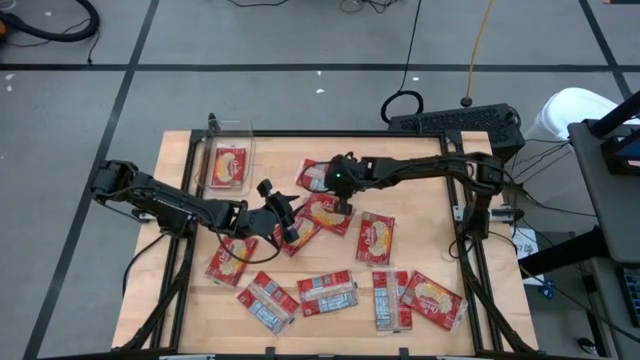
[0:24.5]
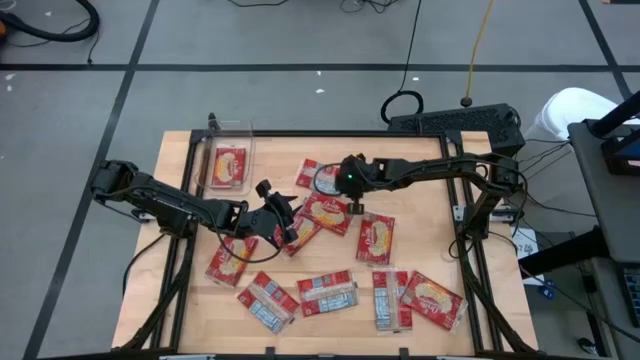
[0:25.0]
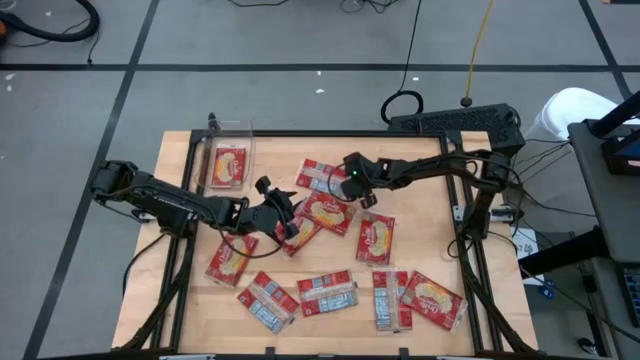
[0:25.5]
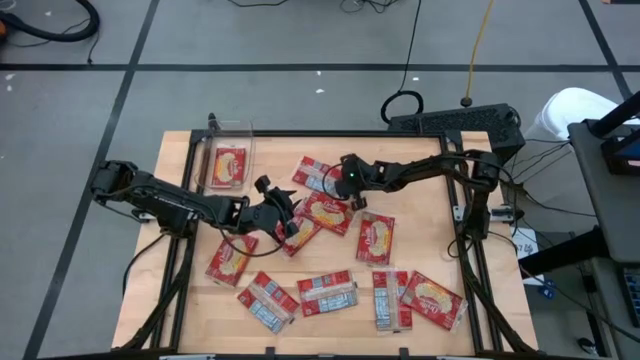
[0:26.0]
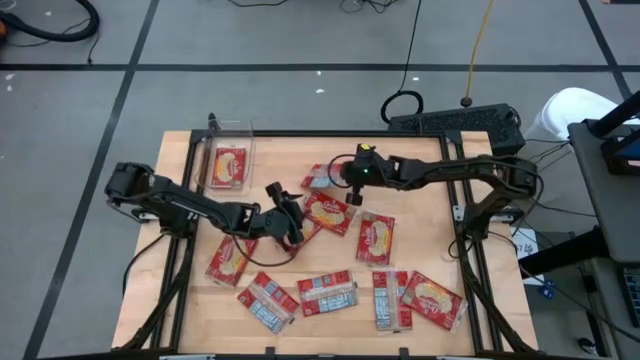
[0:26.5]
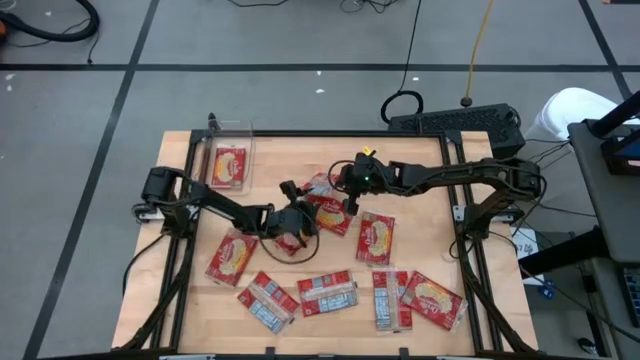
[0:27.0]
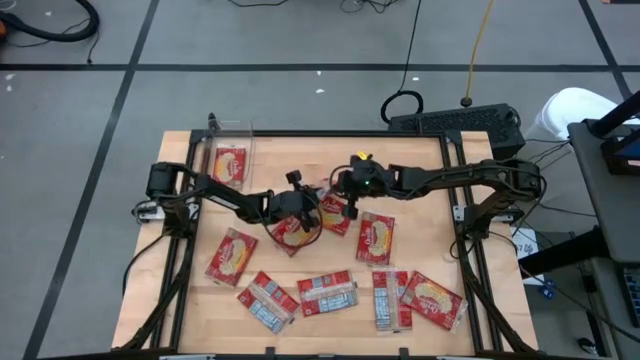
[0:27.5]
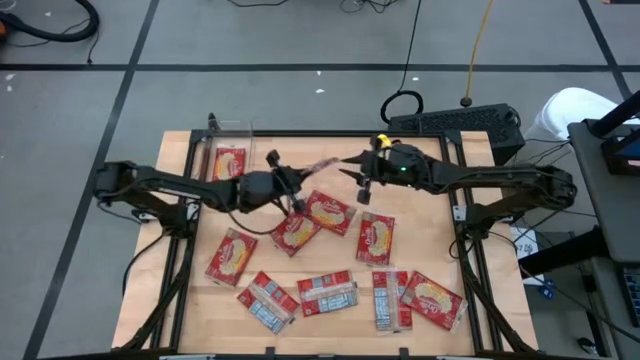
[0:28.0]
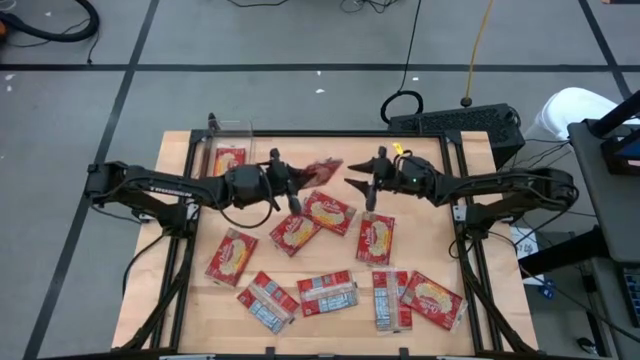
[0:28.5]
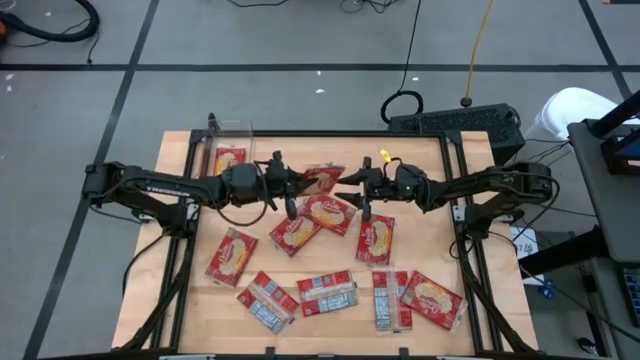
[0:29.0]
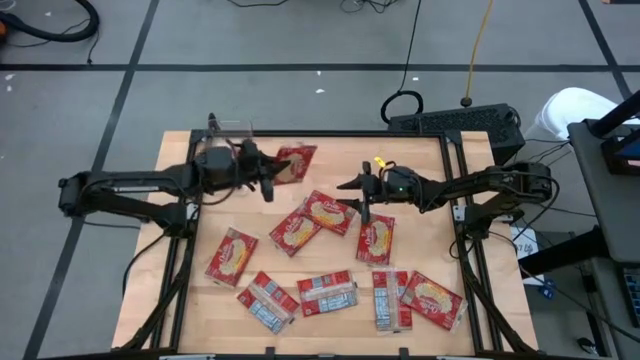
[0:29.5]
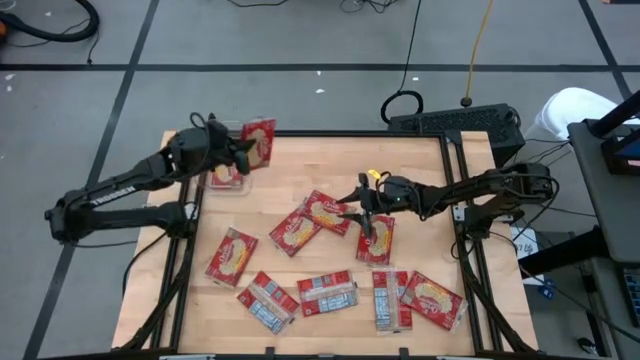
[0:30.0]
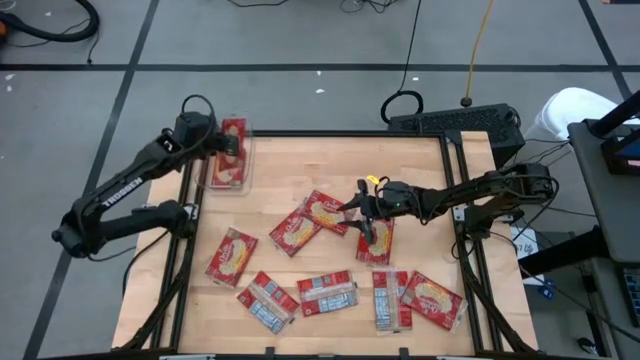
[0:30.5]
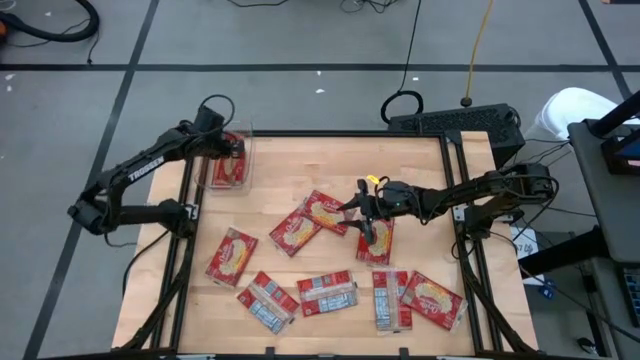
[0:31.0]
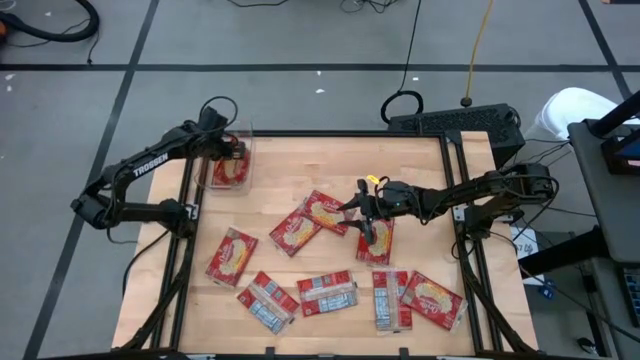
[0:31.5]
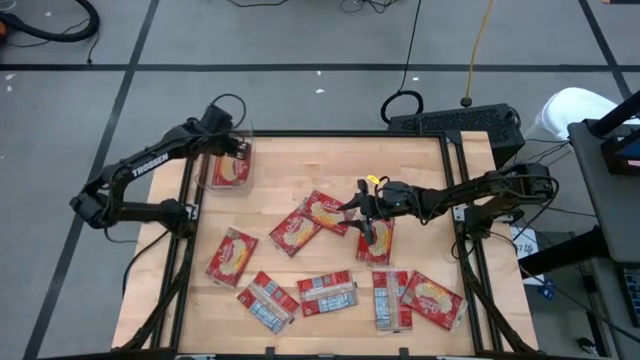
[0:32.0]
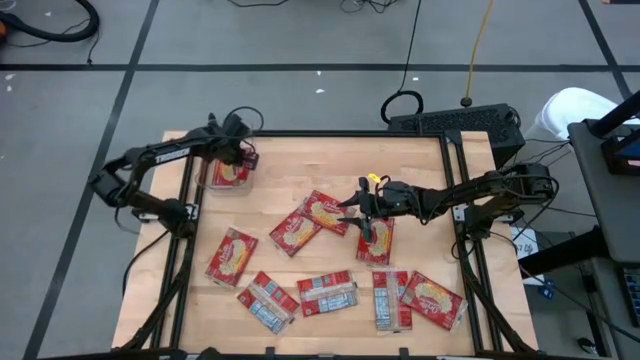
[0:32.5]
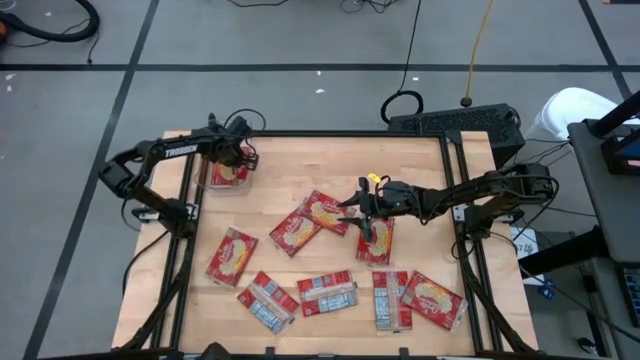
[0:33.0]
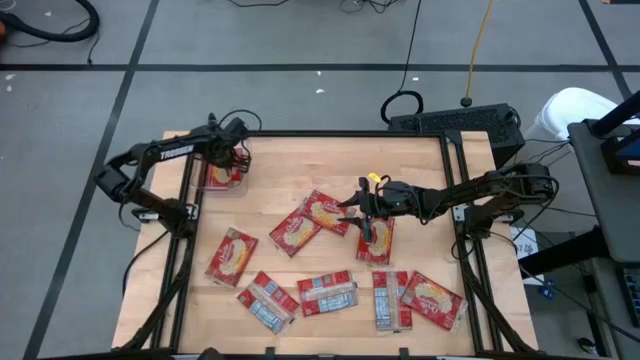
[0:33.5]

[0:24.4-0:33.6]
Task: Sort popcorn bags into baskets
Put the red popcorn bag into the transparent bin

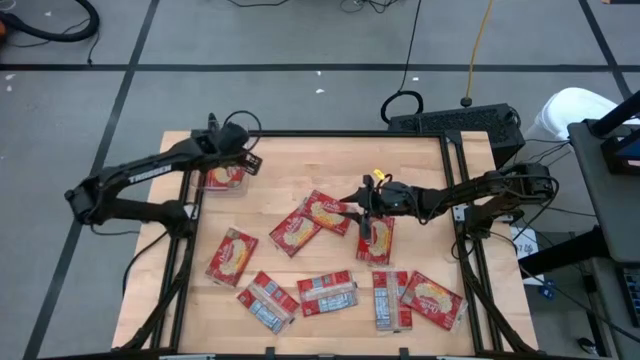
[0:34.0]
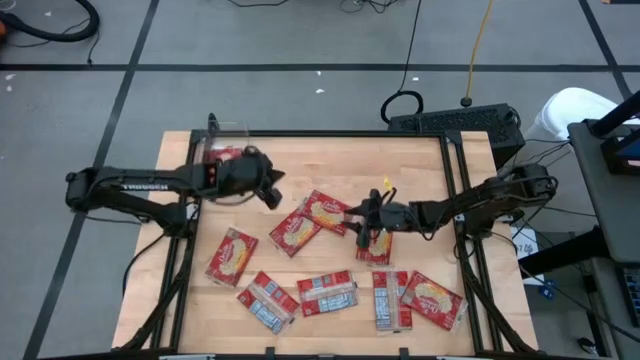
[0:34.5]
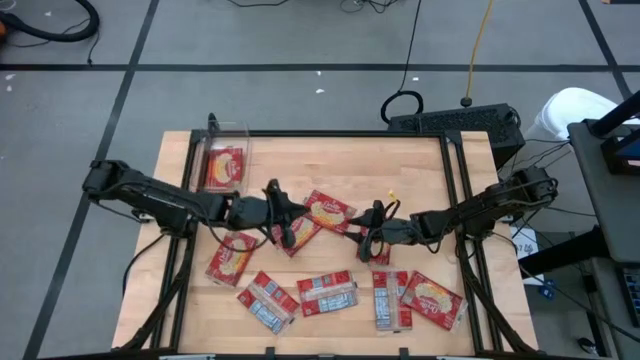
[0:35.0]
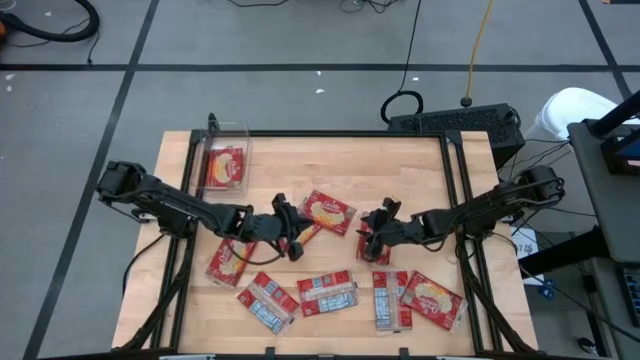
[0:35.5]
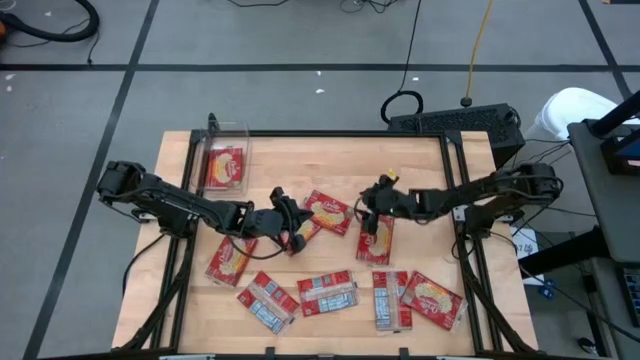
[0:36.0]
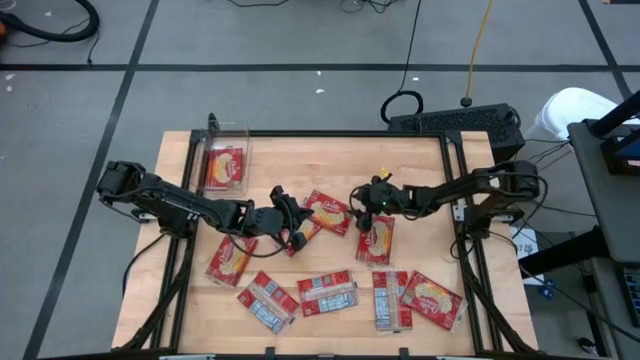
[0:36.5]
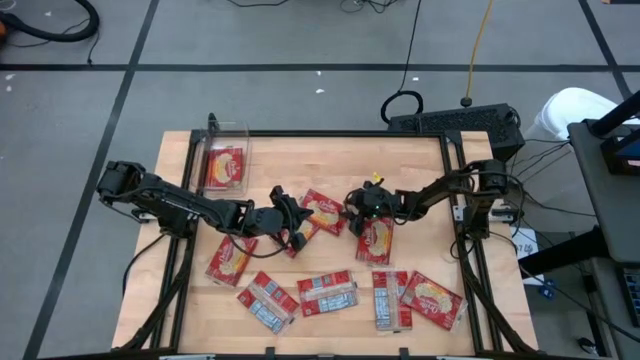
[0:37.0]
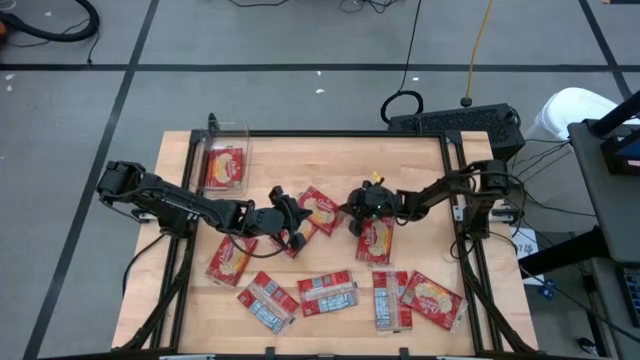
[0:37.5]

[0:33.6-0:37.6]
Put the red popcorn bag into the transparent bin

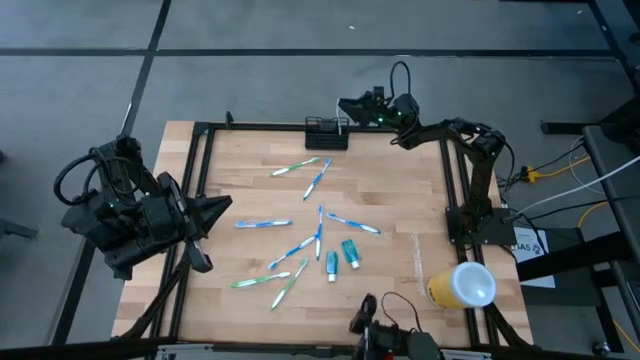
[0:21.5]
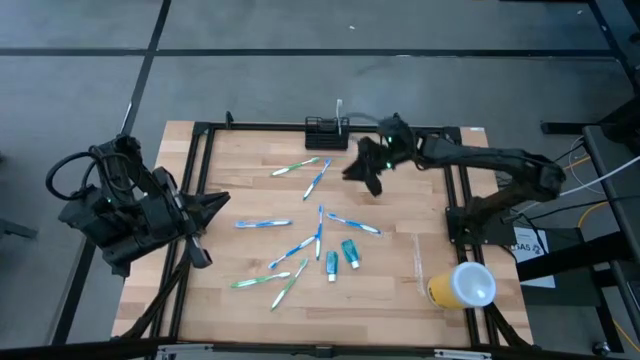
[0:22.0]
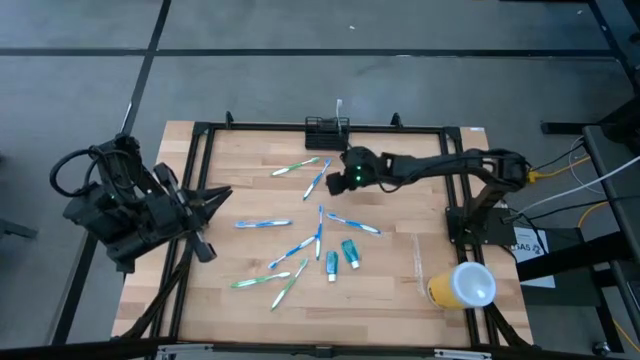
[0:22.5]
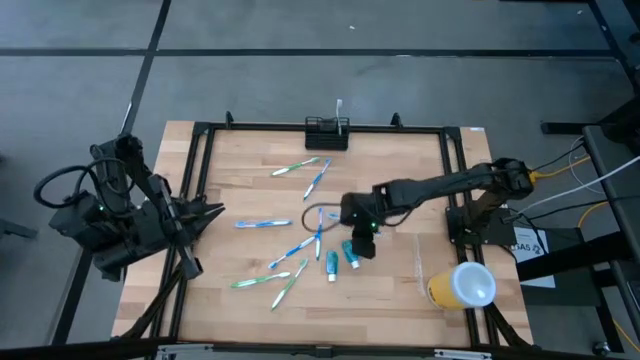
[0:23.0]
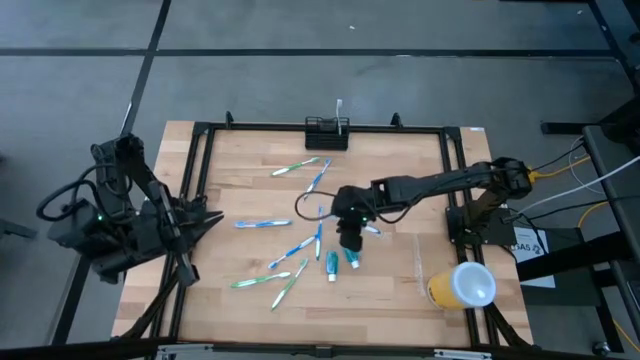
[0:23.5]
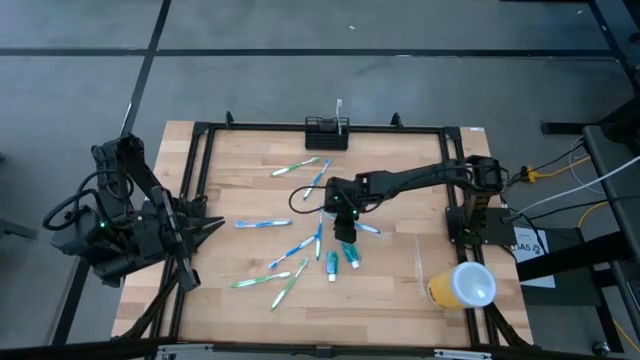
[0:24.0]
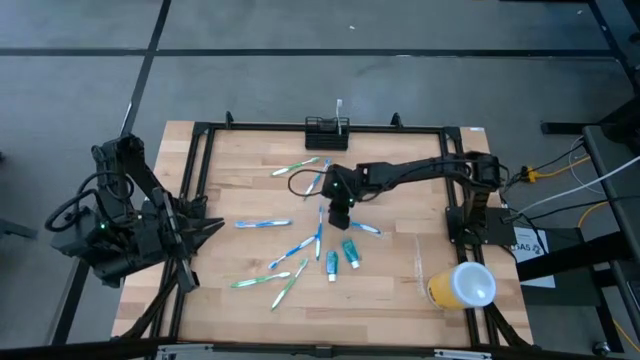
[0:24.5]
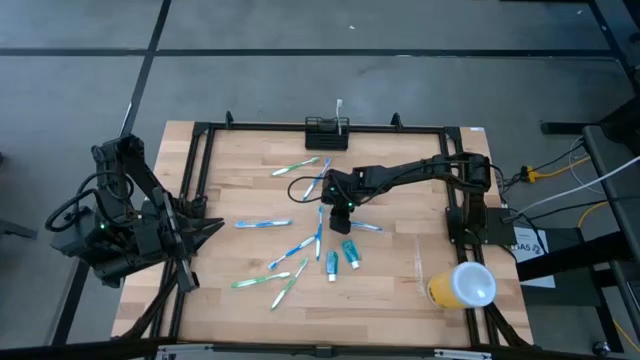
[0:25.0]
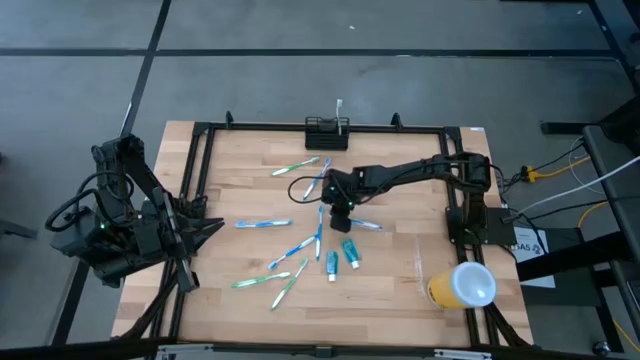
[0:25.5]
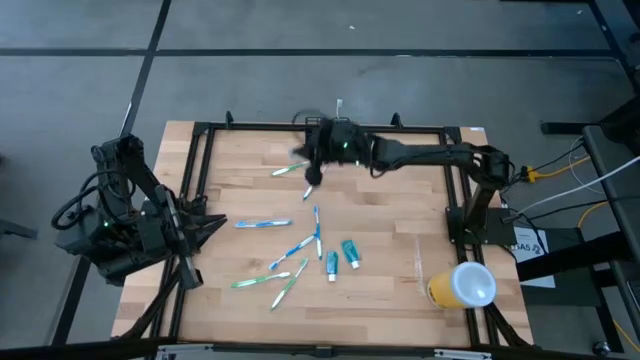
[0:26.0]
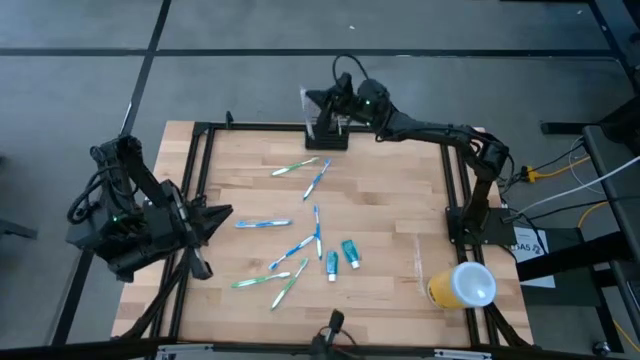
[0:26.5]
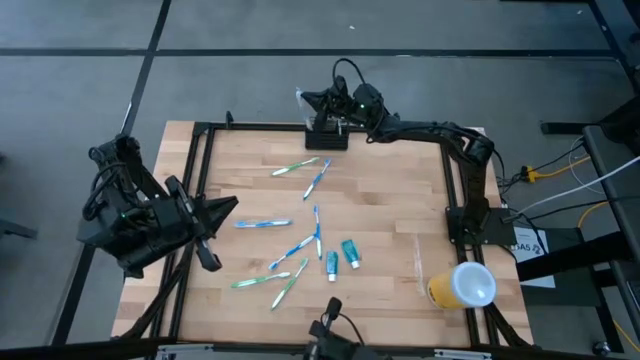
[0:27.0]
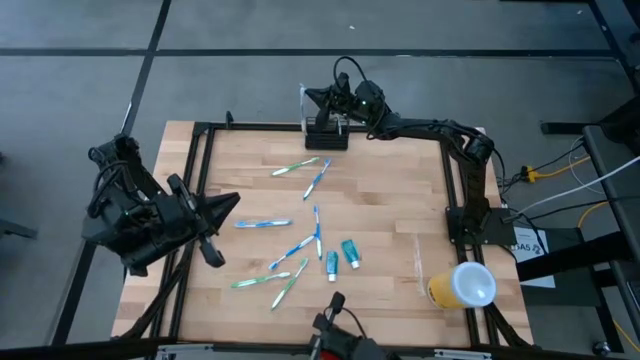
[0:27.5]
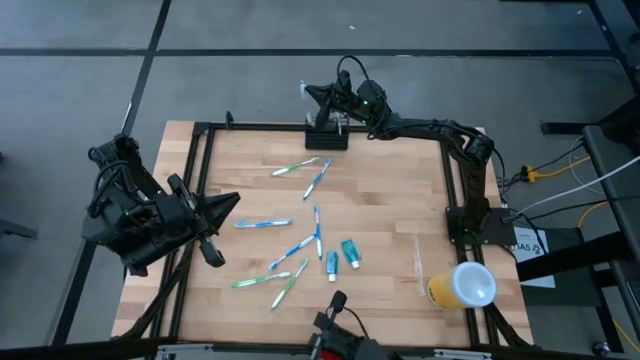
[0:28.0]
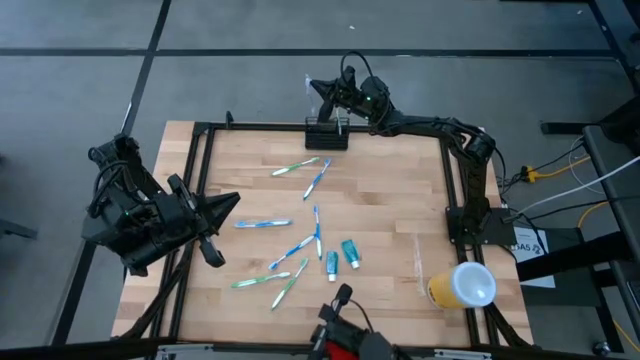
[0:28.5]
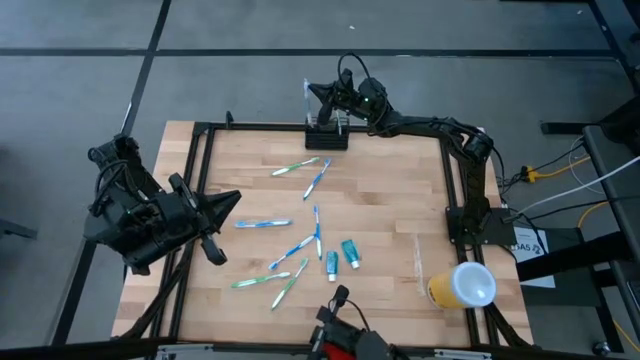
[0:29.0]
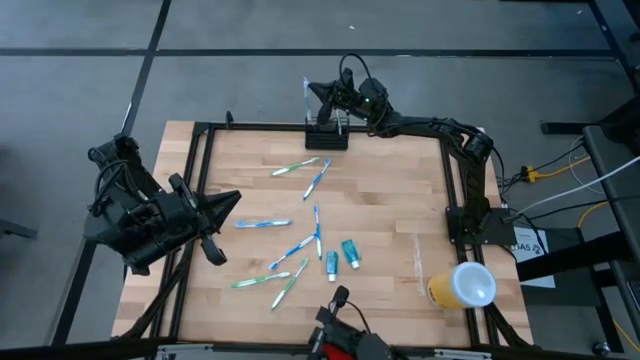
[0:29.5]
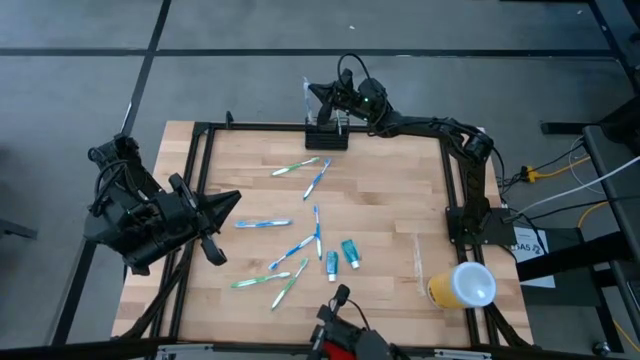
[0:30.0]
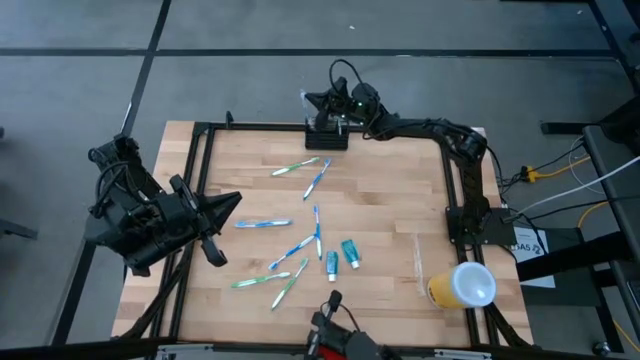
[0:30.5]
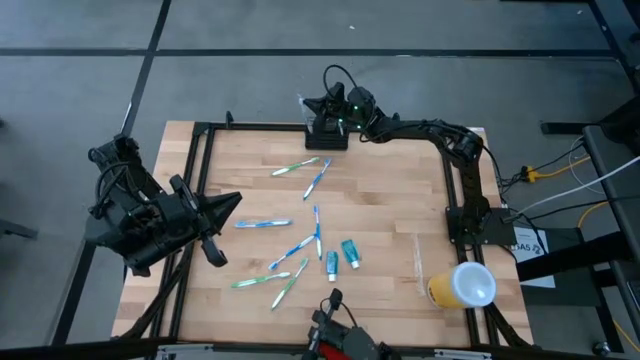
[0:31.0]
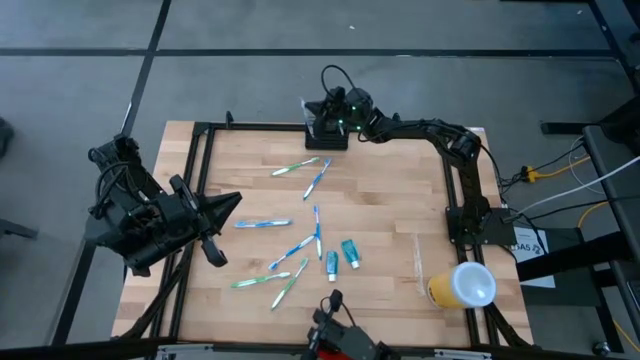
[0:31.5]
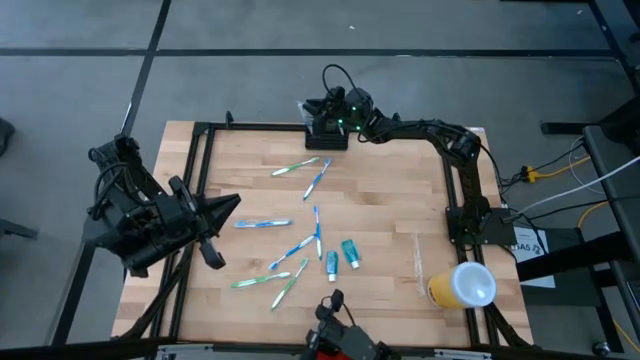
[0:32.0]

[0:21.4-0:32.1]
Task: Pick & Place toothbrushing station
Put the blue toothbrush into the wire organizer
